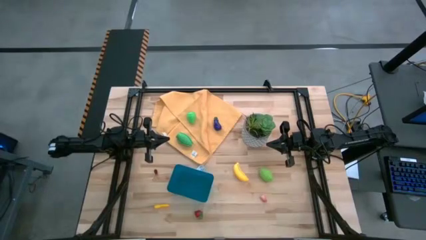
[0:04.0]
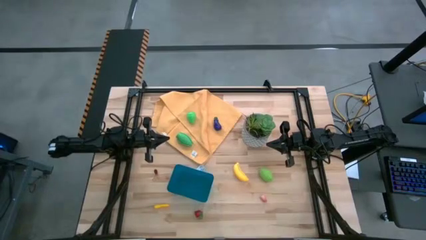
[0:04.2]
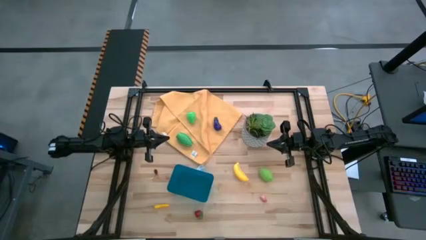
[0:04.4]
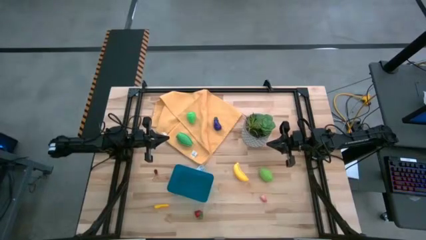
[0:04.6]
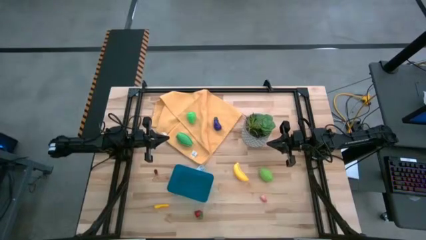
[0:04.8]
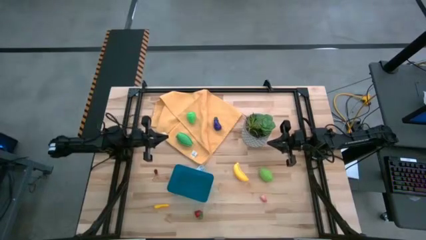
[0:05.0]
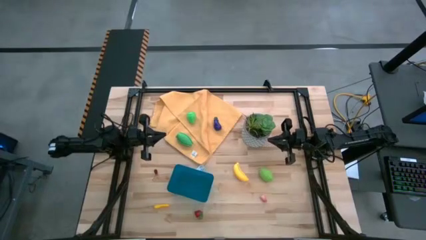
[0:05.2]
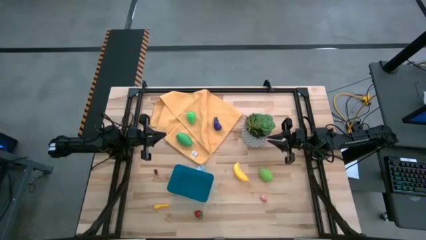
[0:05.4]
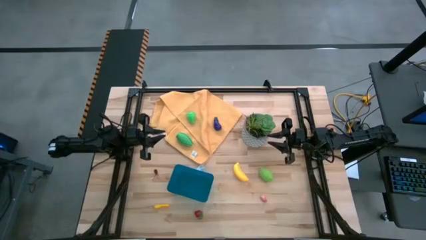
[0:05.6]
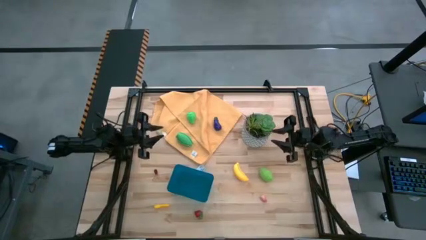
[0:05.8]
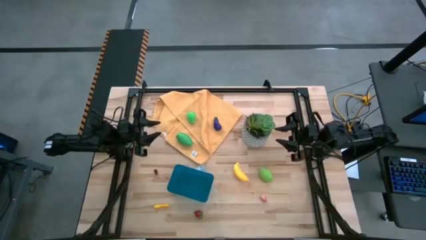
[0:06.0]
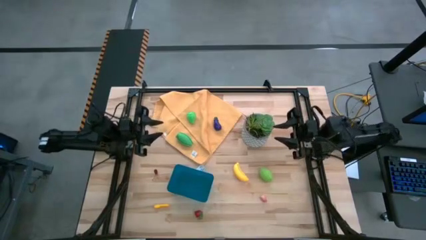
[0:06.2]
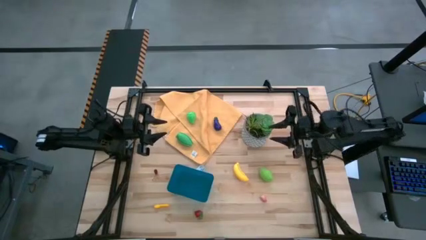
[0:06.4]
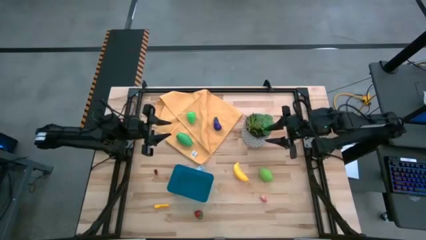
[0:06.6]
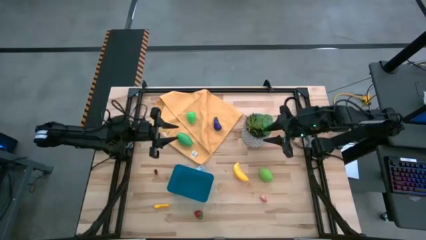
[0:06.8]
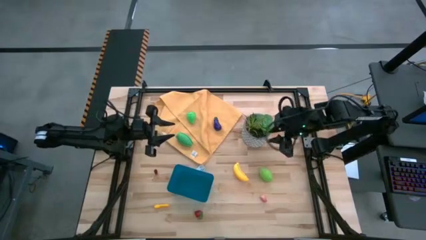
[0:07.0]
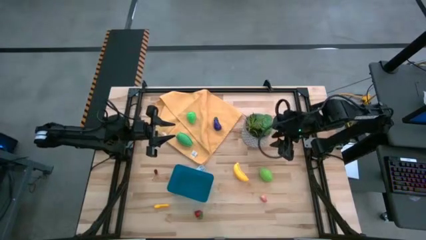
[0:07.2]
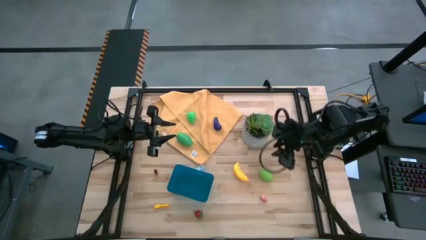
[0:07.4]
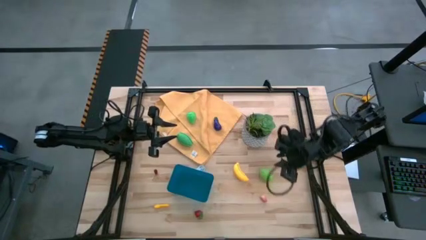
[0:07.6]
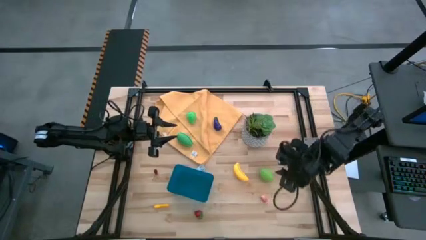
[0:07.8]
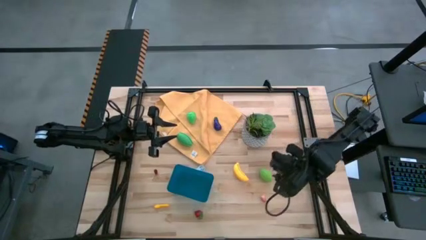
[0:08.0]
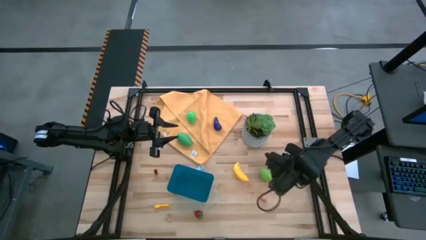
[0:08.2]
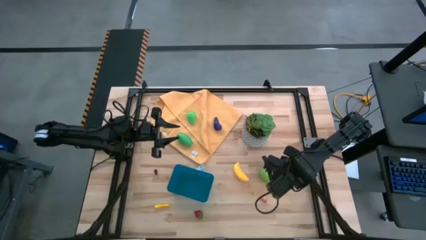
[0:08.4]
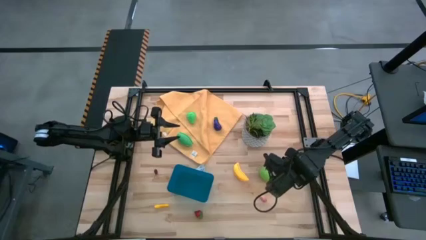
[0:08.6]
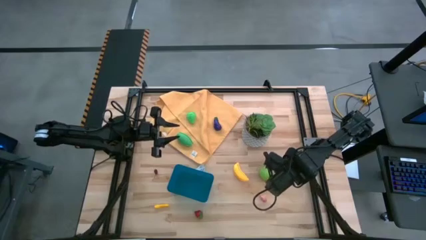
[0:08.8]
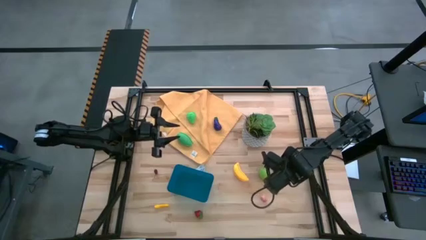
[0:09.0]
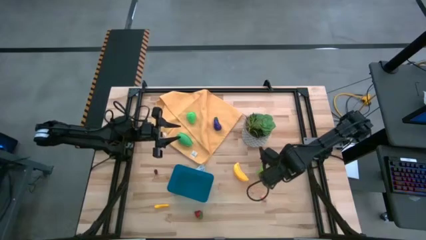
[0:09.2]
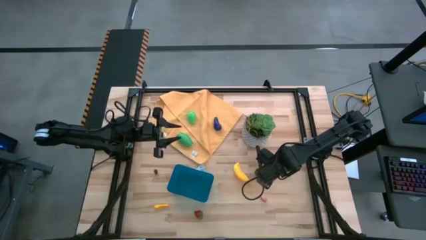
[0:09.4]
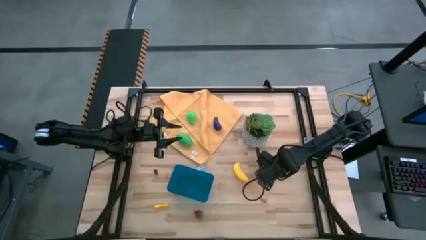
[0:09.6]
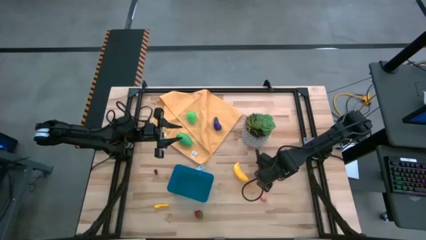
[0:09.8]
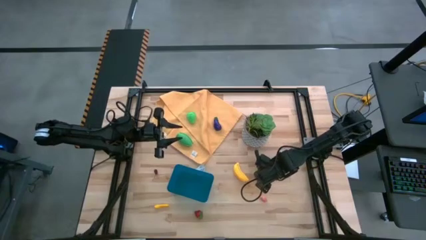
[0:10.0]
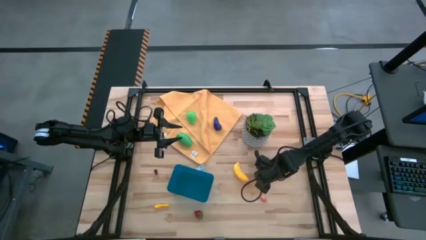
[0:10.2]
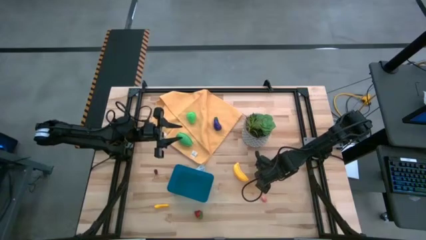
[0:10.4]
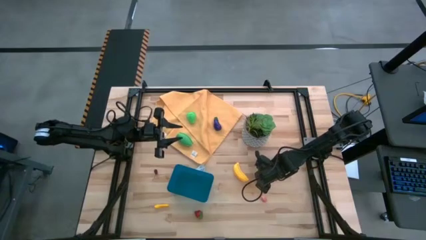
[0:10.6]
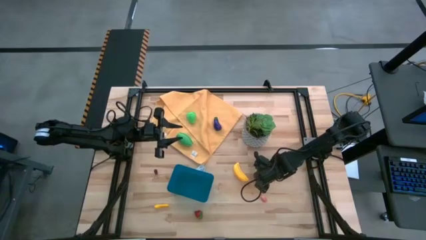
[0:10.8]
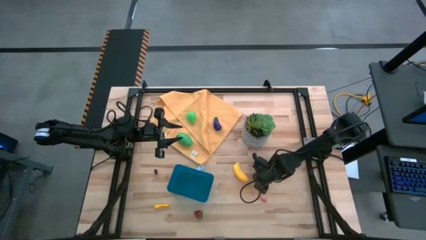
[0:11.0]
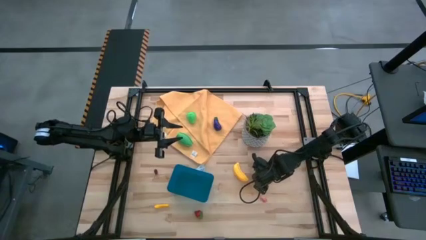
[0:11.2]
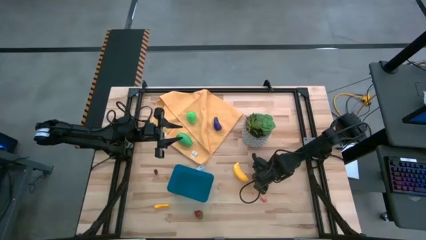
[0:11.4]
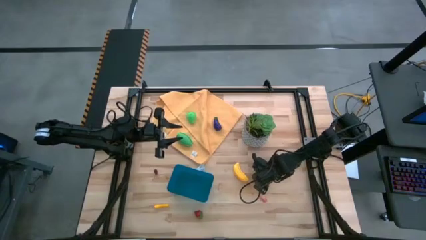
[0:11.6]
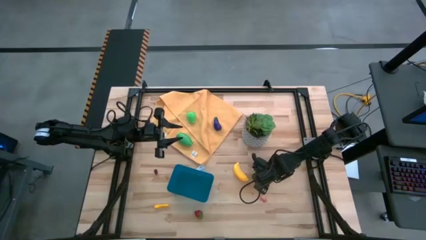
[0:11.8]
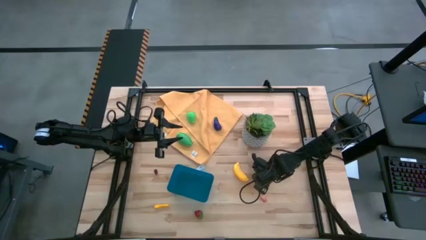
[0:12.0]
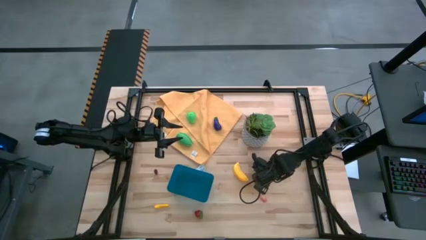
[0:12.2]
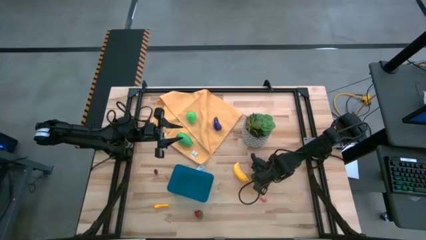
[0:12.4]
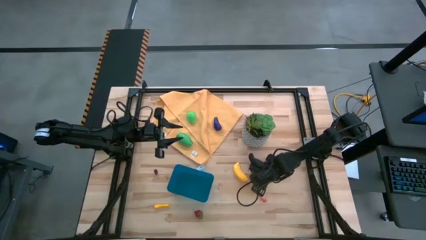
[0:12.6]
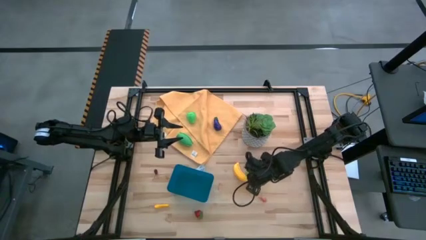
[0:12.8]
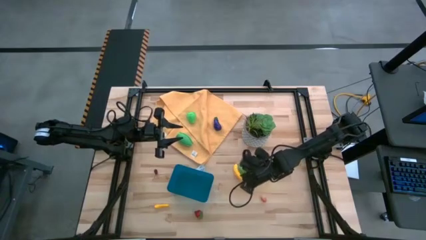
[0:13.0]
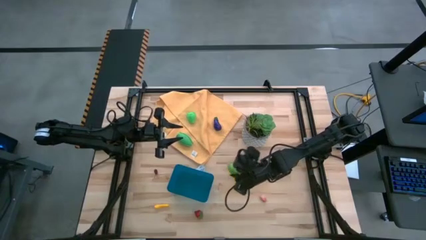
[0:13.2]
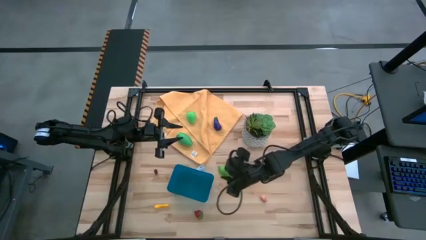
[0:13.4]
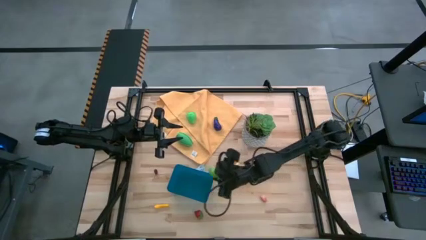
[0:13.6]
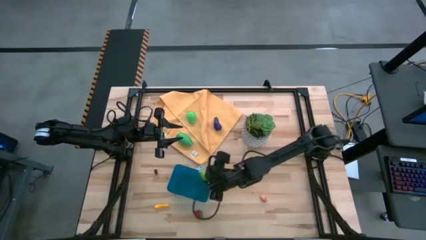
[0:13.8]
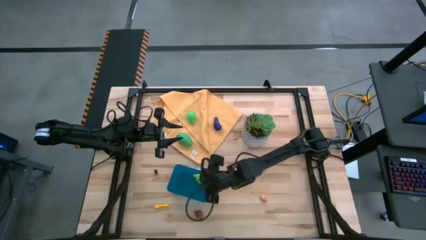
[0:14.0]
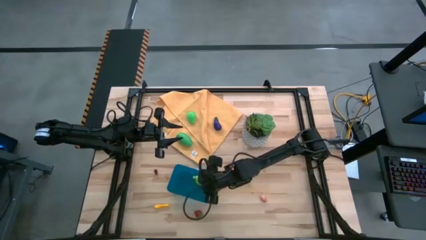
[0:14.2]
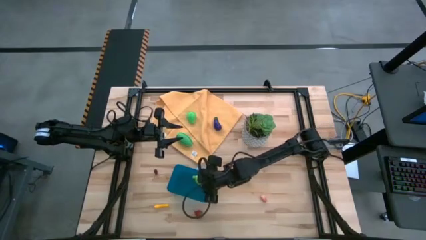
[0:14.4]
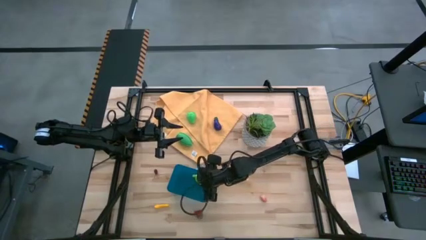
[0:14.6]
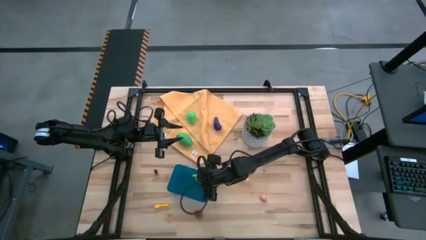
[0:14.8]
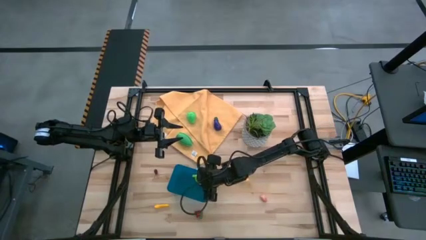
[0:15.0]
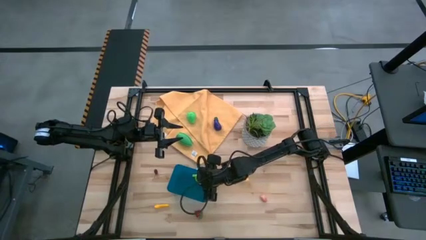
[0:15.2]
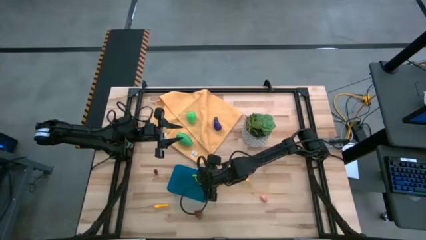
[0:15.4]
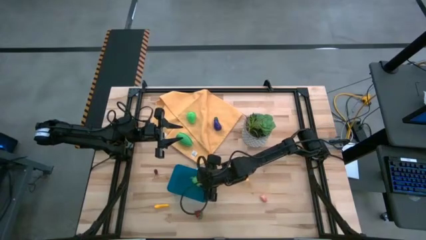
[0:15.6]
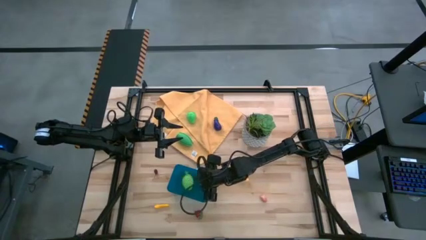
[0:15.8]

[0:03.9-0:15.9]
Task: Pick and placing Produce into tupperware
Put the cabbage into the blue bin
